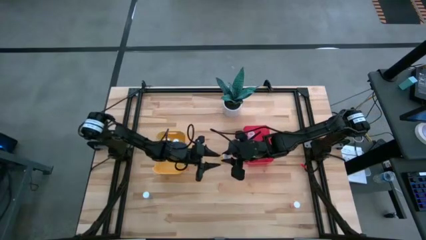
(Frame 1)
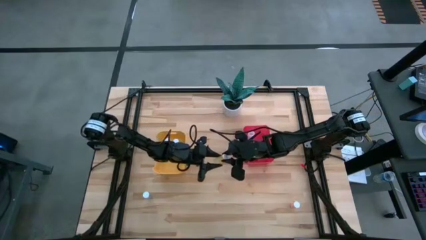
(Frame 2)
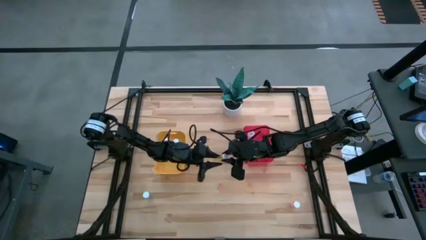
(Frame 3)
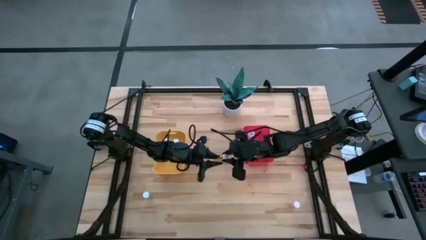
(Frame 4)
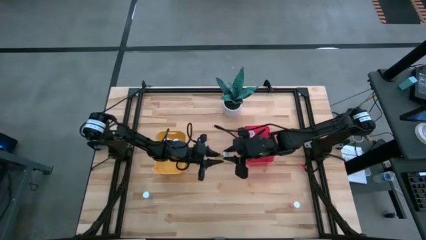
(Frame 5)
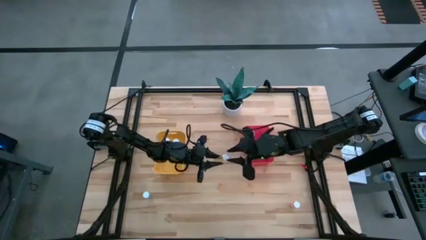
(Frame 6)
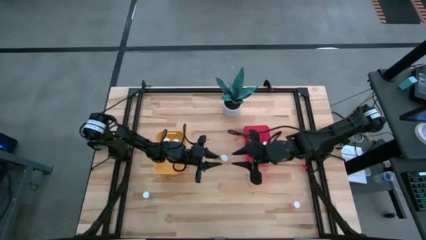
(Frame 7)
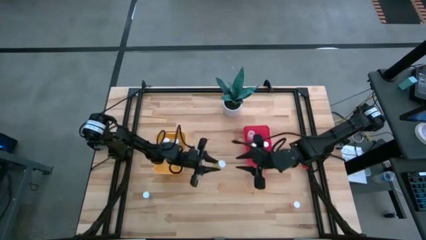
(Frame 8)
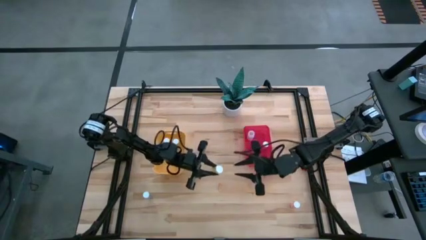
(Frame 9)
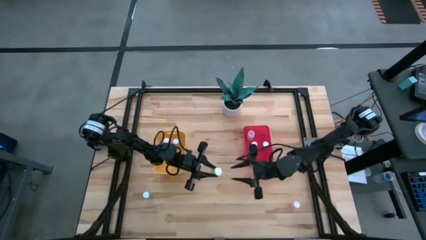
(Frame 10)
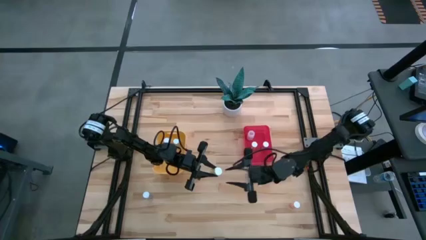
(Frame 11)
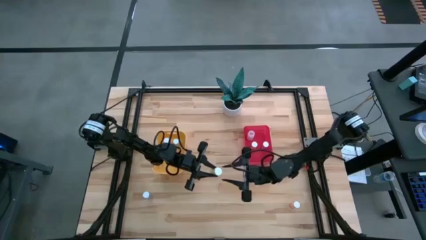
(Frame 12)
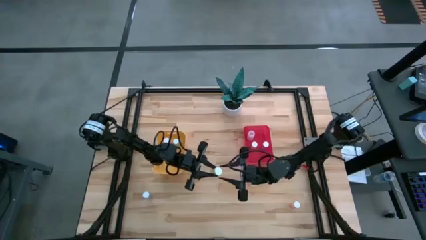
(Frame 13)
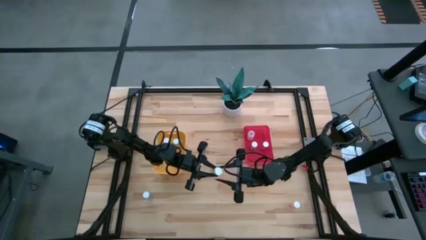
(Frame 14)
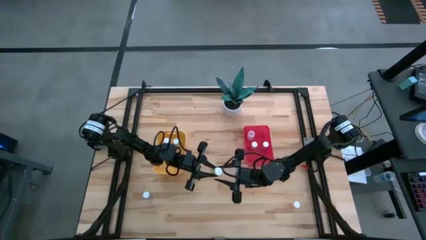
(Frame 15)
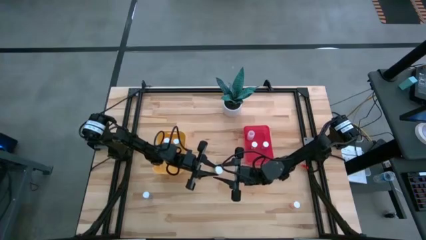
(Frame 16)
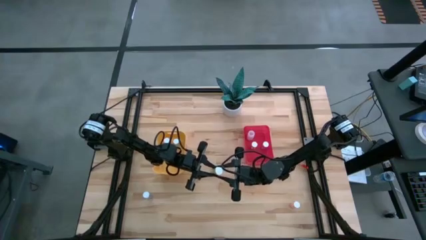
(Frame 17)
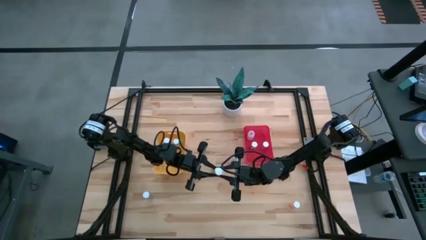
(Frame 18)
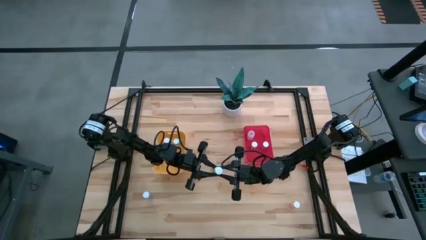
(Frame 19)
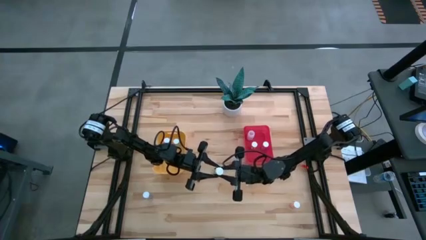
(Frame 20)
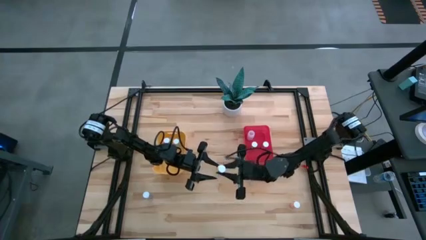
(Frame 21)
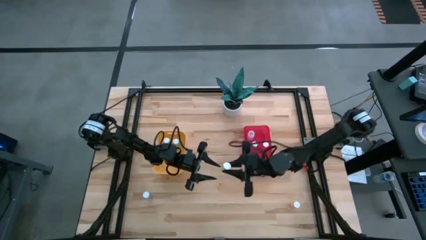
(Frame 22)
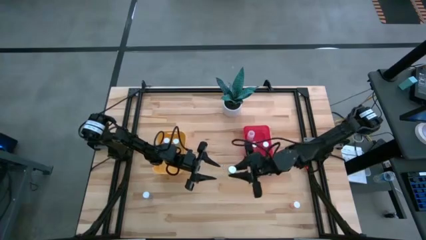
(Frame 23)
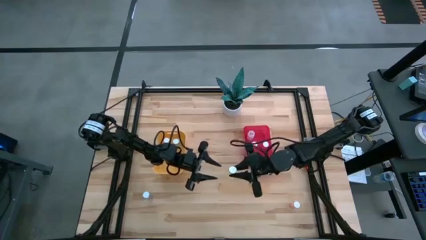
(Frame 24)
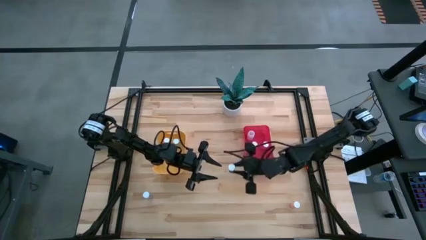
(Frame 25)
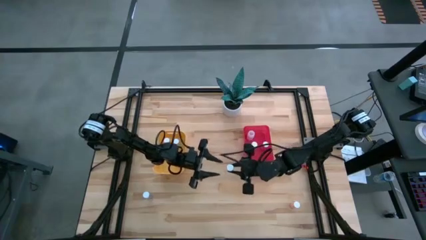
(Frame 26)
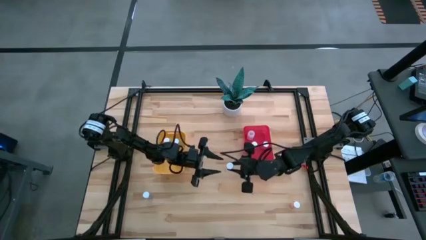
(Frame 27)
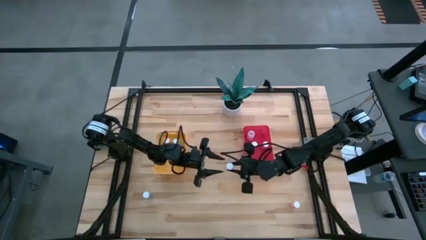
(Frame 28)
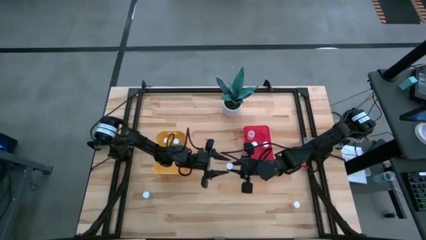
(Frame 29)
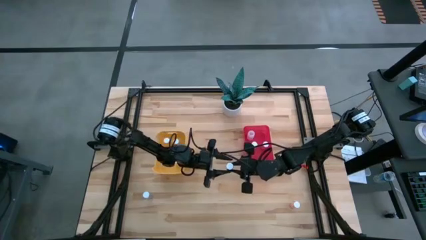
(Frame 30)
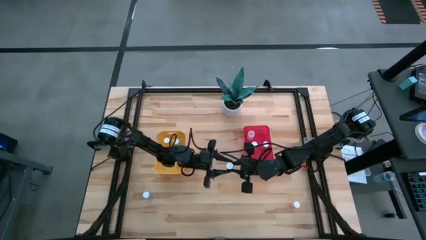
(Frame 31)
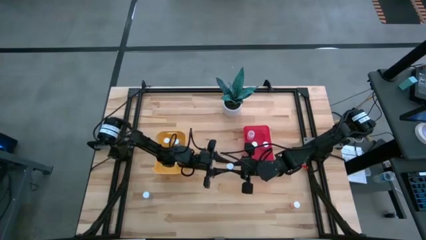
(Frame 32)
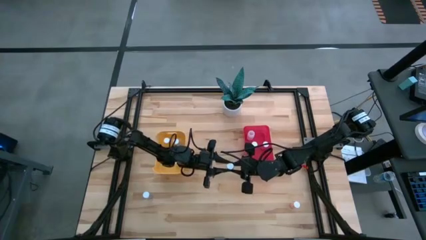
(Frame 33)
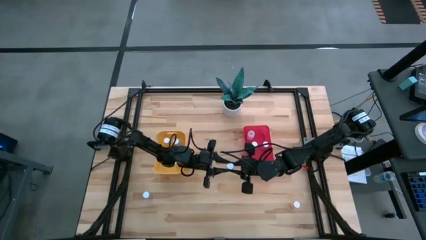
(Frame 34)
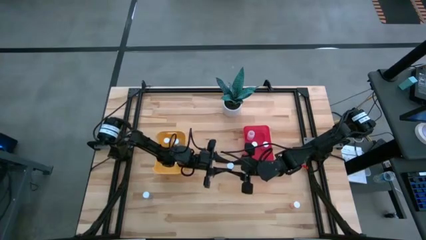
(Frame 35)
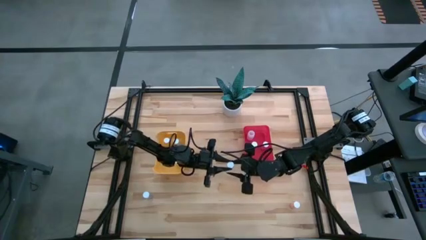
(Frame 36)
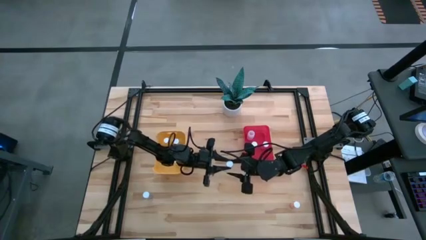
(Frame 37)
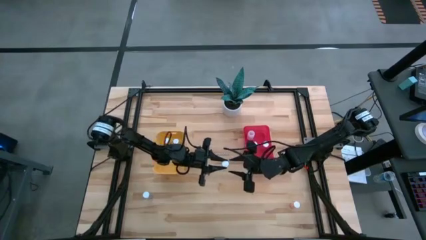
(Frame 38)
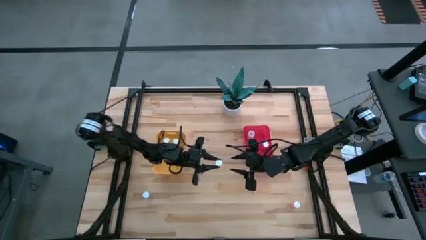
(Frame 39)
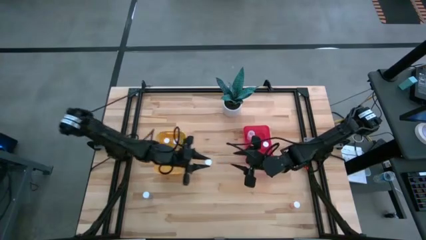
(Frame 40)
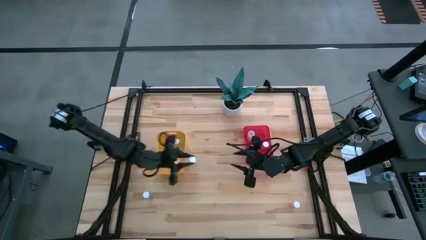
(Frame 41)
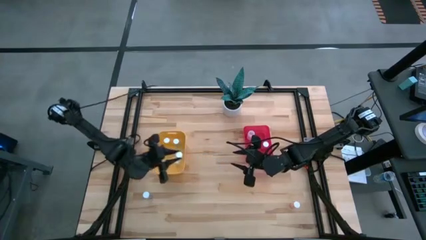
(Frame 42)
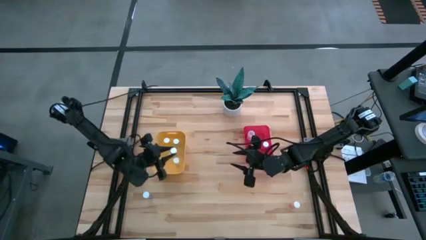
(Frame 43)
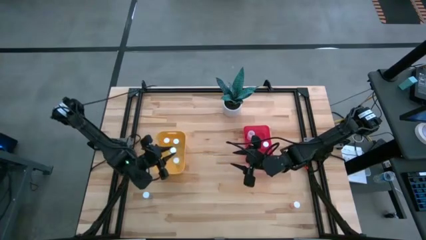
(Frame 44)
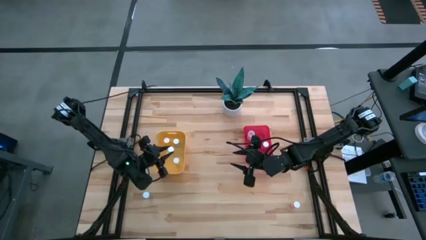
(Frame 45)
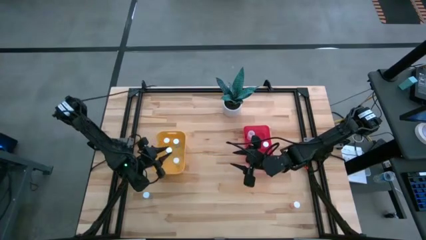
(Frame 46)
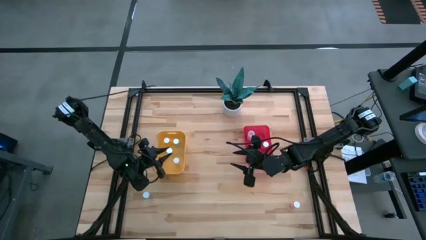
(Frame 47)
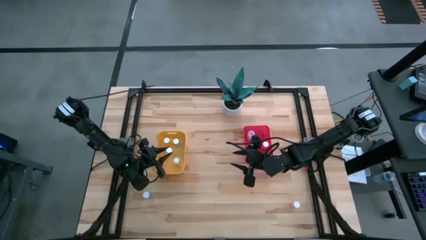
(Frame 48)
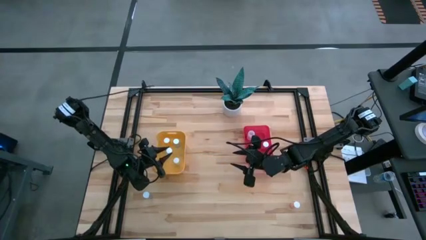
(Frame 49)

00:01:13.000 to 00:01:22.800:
Task: Pick and place medicine bottles into bin by pill shape (circle, oval)
Put the yellow tablet bottle into the yellow bin
